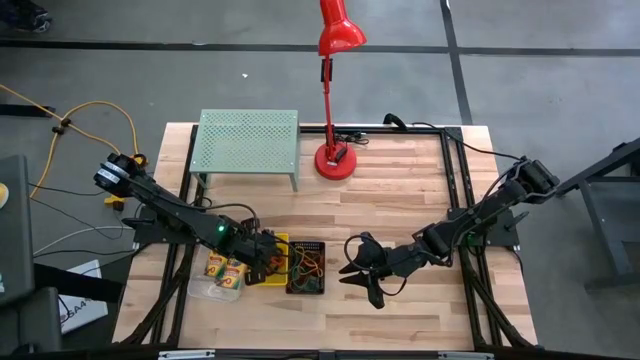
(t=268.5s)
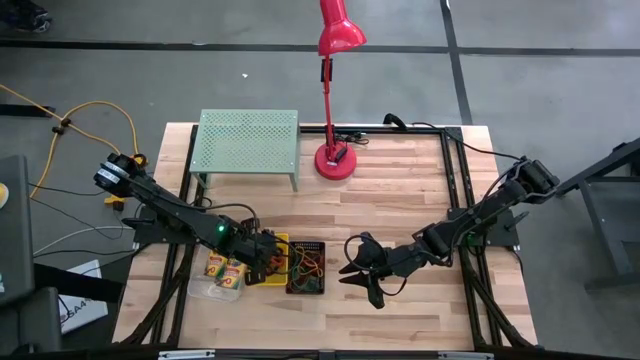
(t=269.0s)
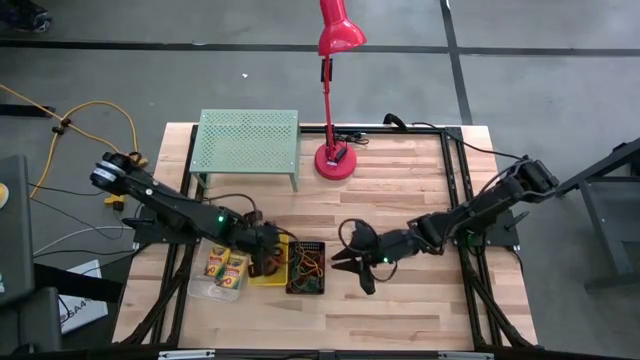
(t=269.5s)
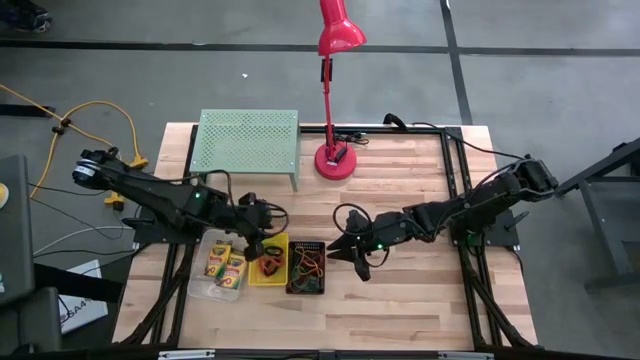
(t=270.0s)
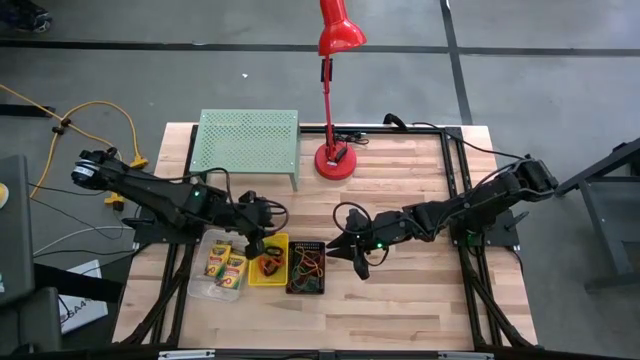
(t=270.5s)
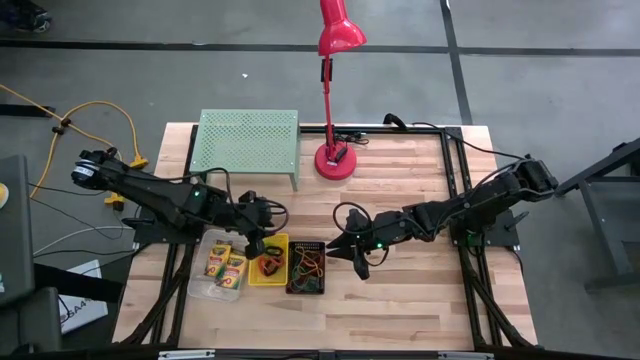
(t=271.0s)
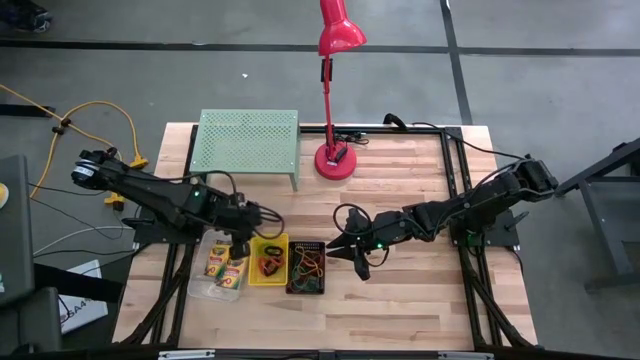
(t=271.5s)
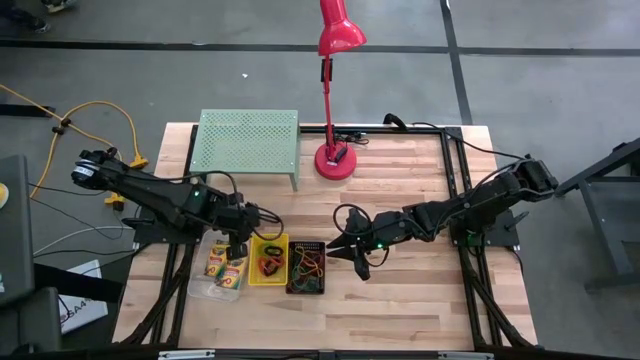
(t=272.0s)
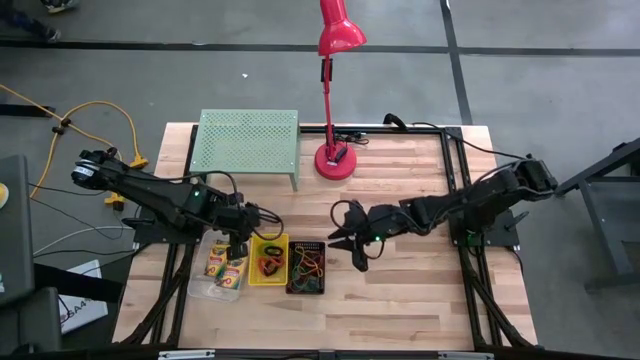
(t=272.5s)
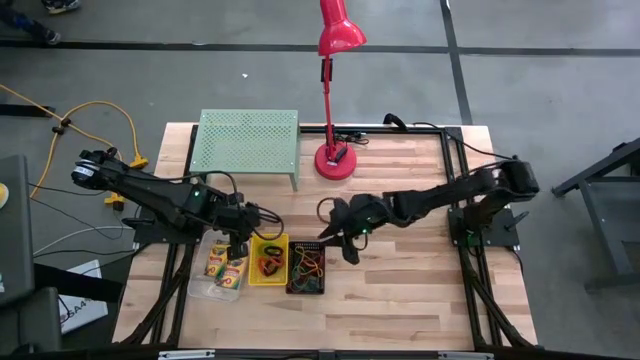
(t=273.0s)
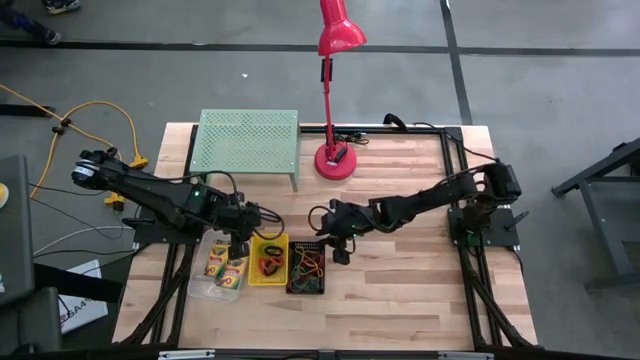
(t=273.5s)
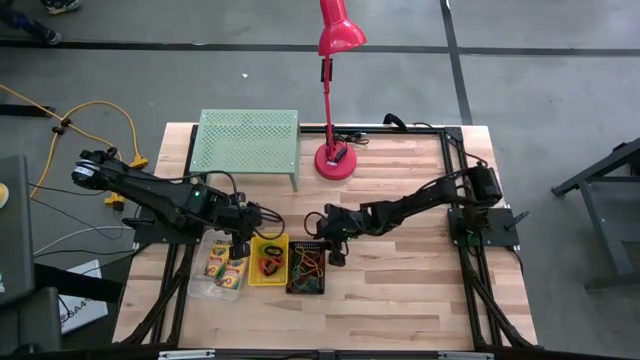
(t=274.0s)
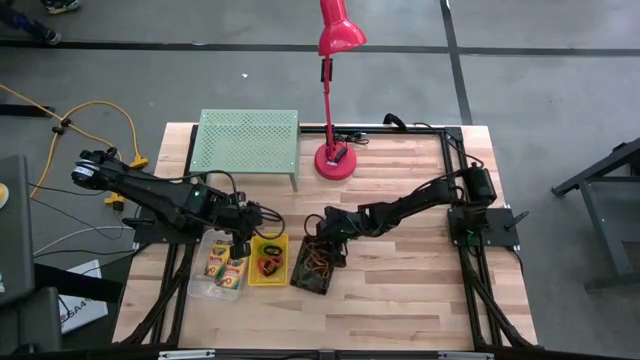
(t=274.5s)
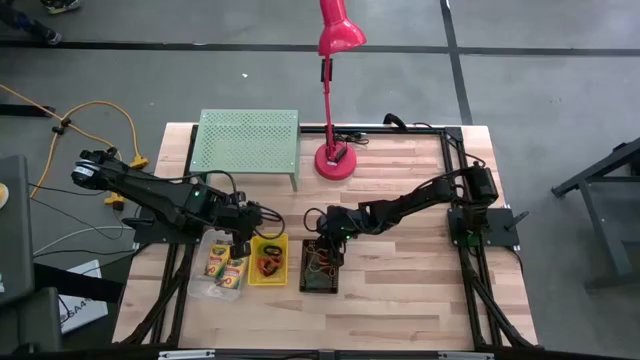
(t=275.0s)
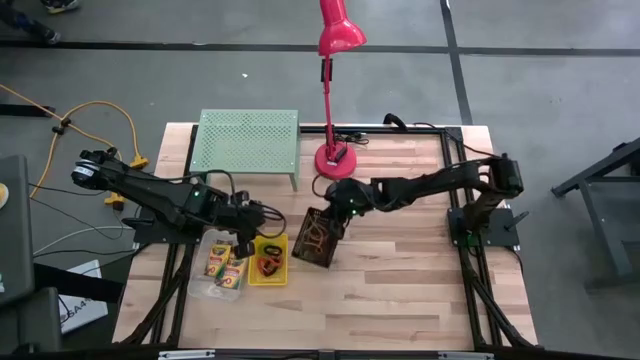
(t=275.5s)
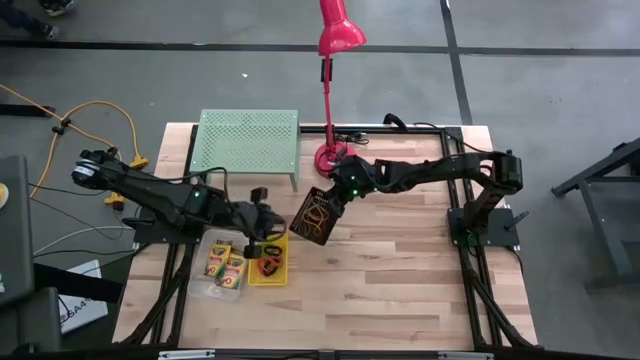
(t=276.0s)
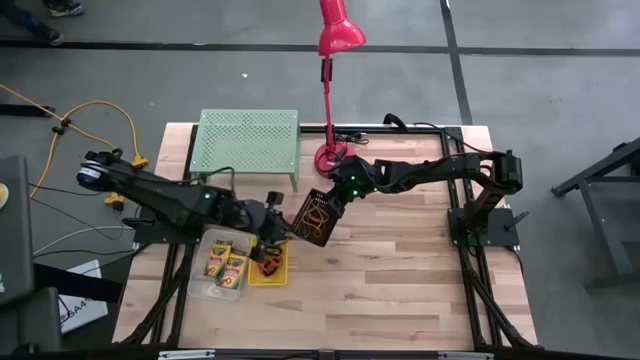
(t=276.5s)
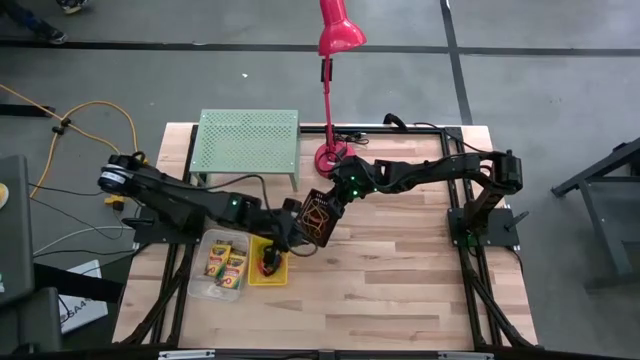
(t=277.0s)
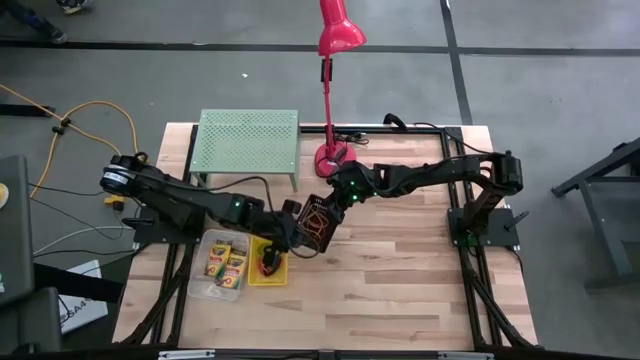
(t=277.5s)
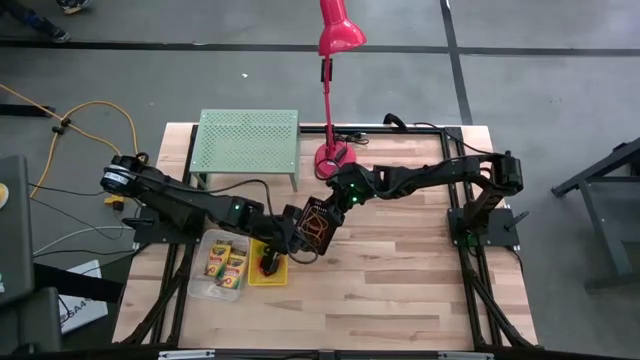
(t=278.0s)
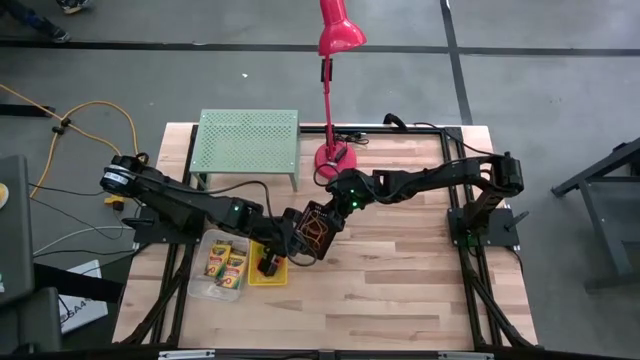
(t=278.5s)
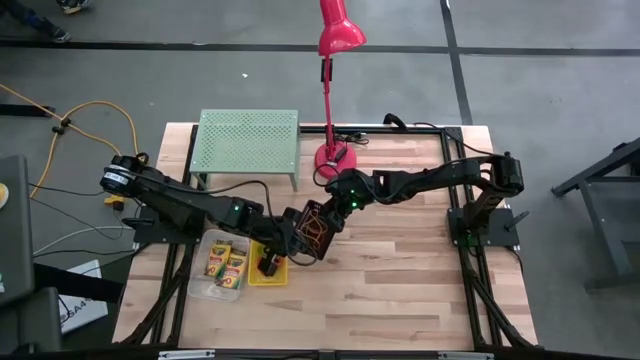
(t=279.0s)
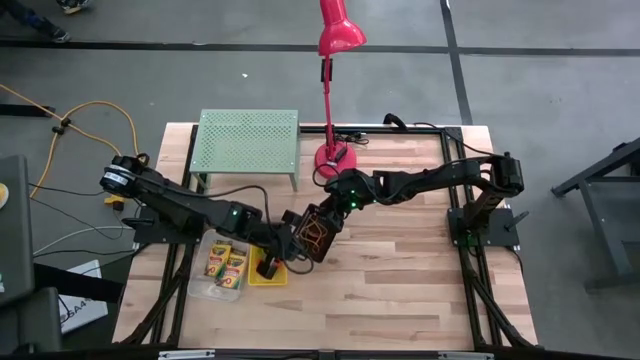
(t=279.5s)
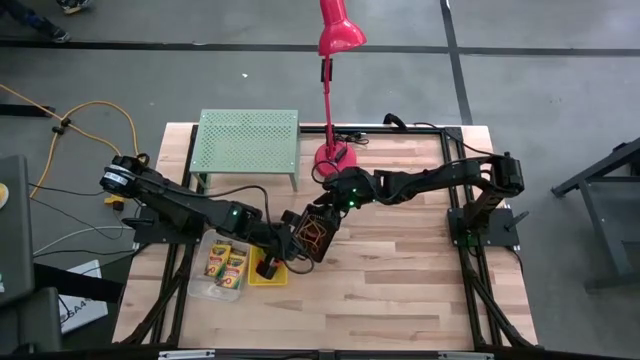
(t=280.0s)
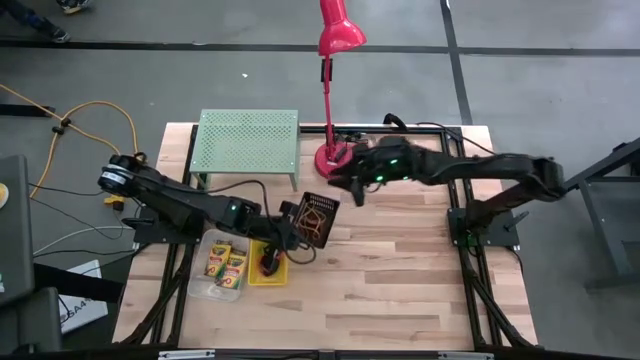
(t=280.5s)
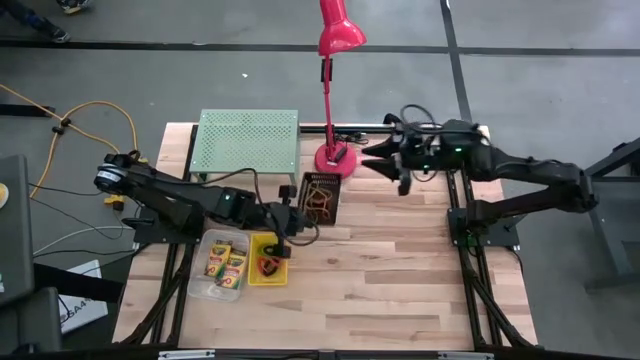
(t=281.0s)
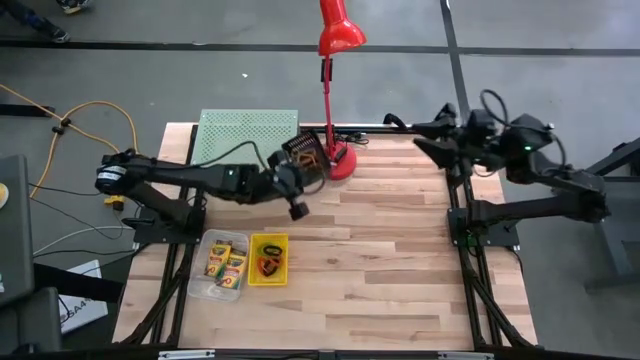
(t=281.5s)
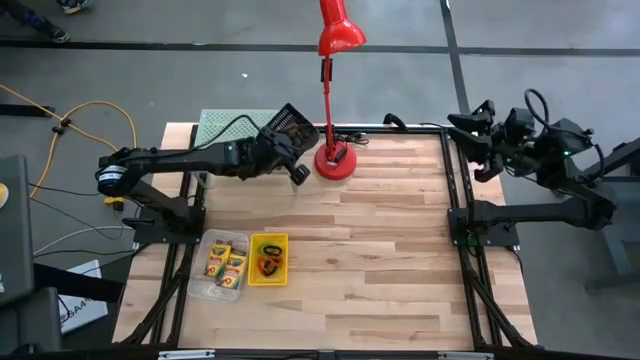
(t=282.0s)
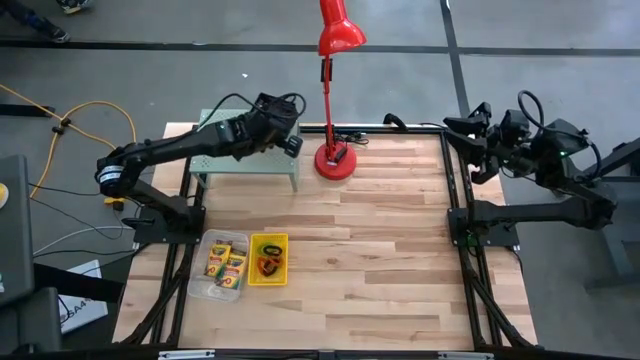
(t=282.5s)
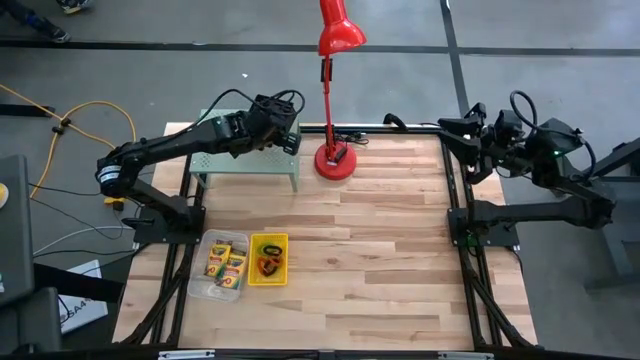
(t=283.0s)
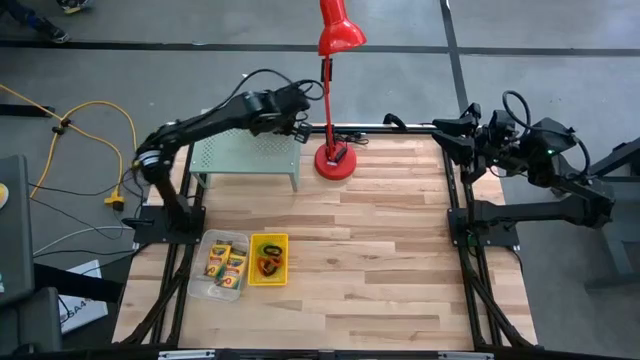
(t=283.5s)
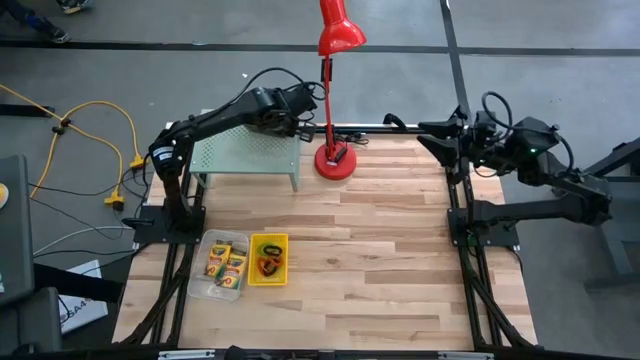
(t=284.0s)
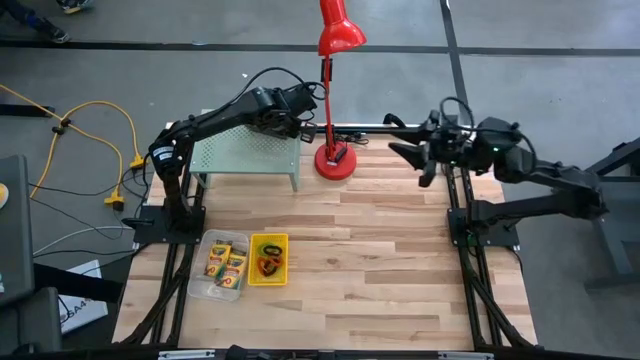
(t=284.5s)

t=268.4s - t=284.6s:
Task: Pick & Place Office Desk Supplies
Put the black bin with rubber bands on the shelf

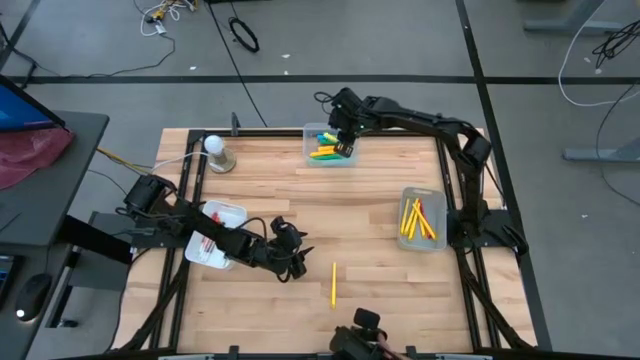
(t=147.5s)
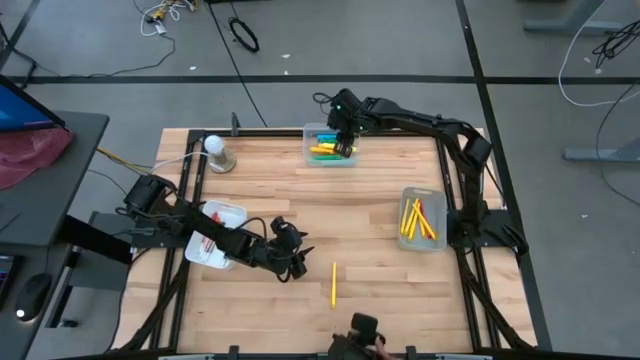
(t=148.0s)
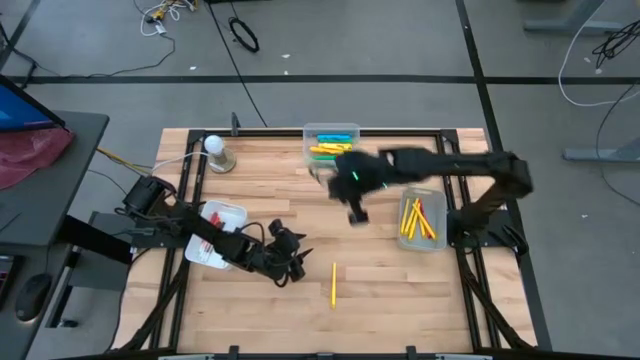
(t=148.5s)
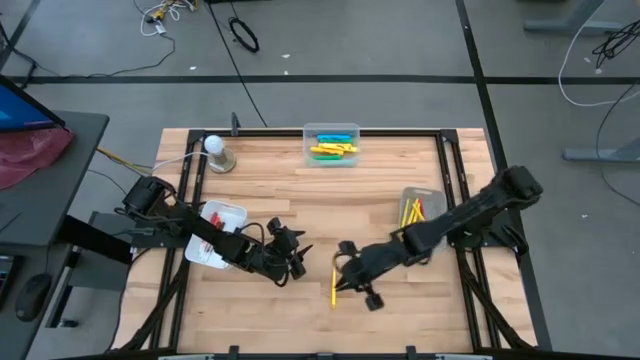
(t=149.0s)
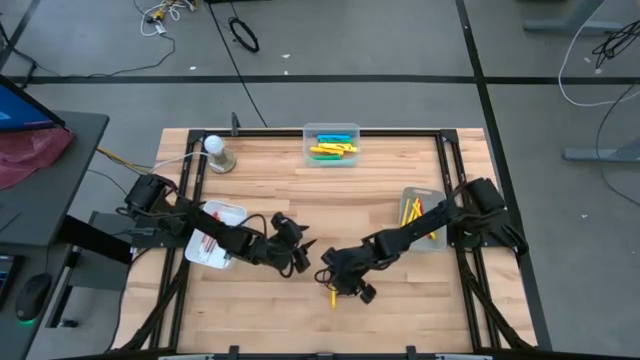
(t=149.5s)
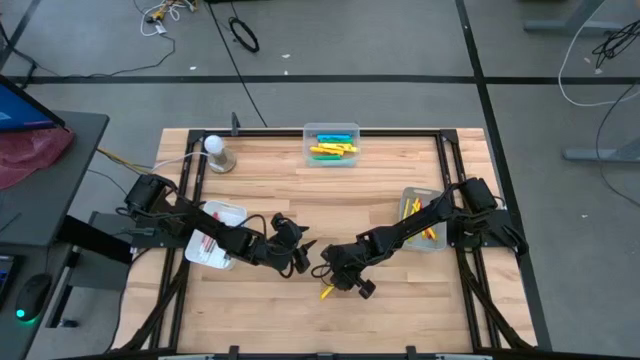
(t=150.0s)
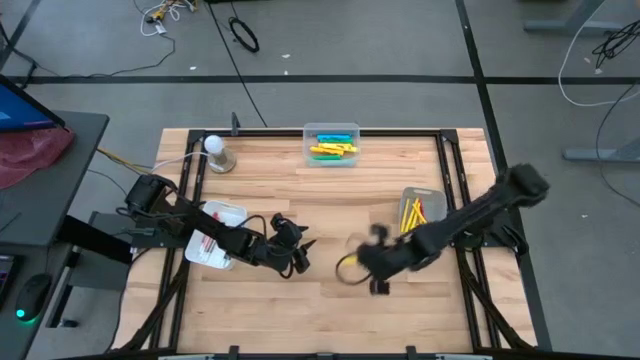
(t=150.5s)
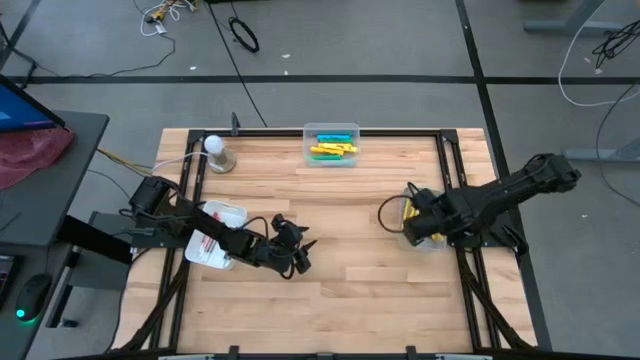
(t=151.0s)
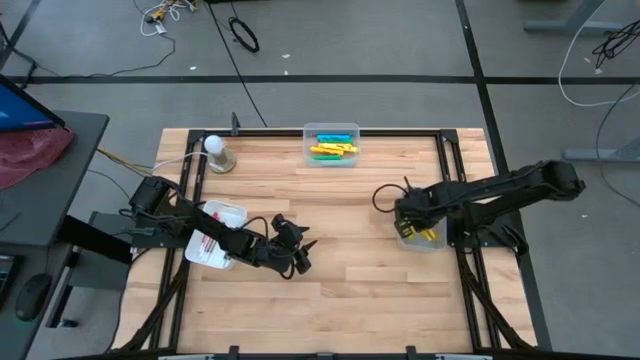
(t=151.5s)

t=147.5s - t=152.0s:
Task: Pick & Place Markers
Put the yellow pen into the gray bin
